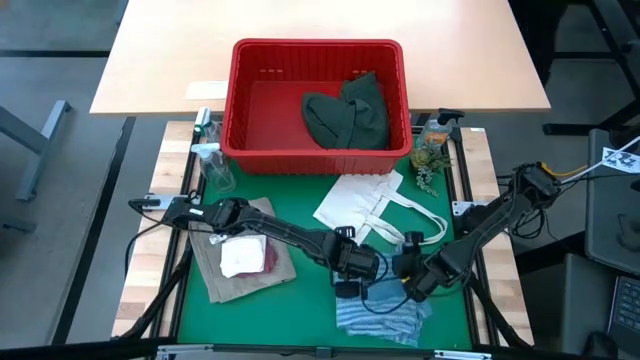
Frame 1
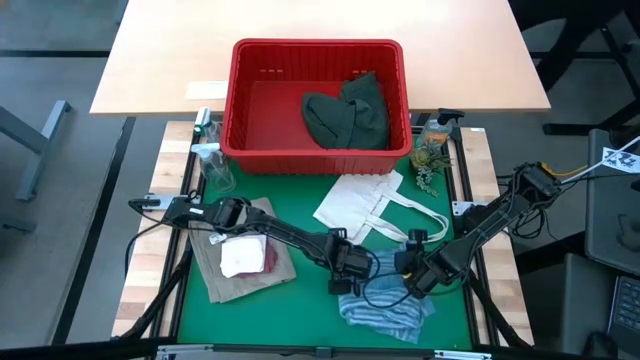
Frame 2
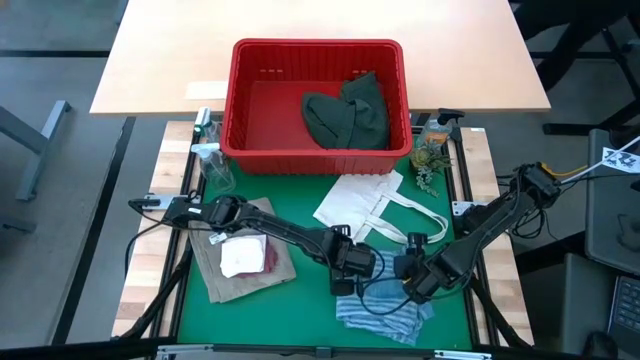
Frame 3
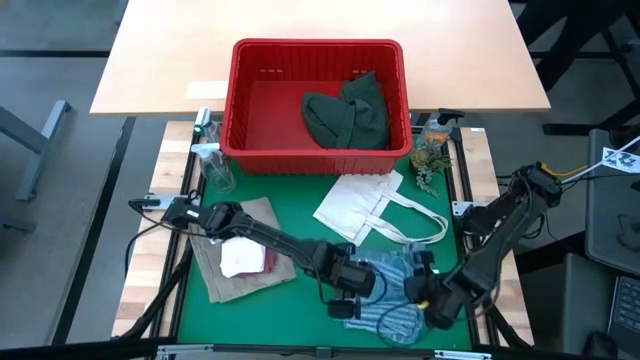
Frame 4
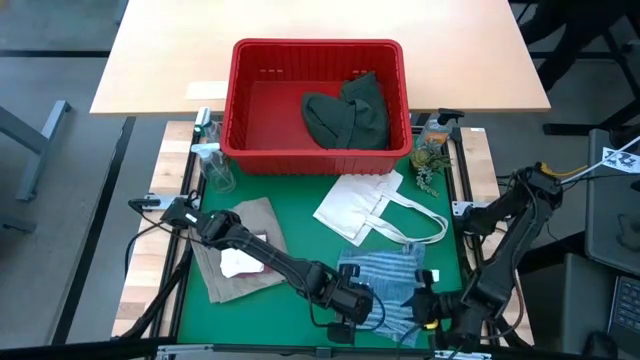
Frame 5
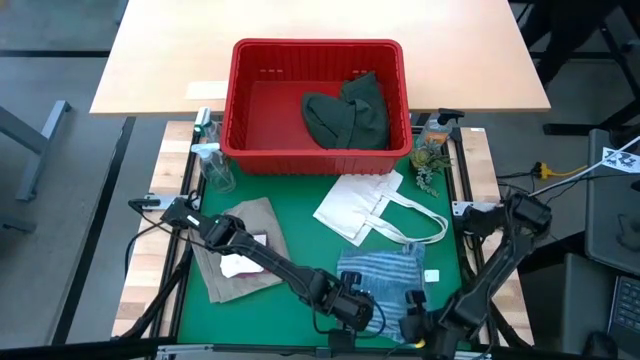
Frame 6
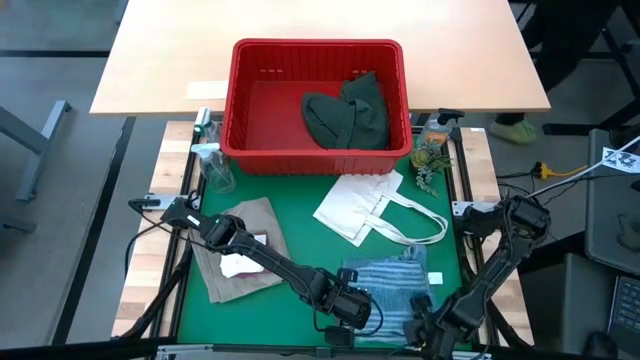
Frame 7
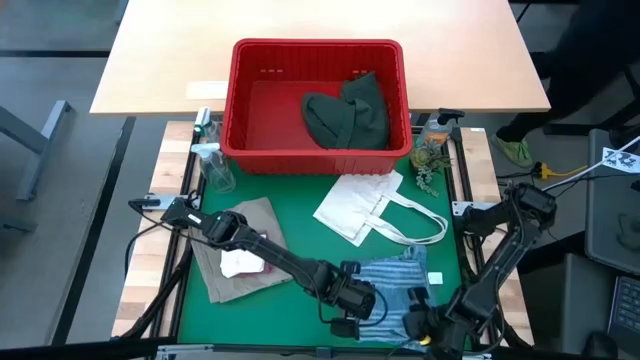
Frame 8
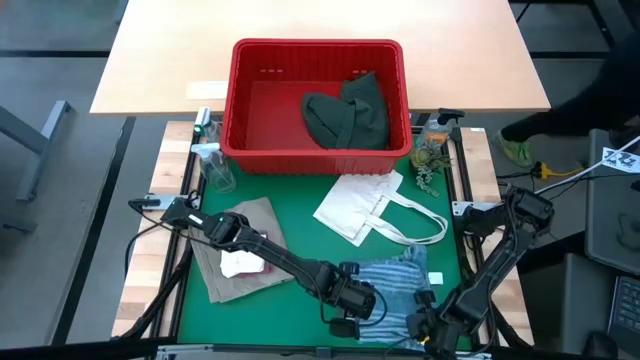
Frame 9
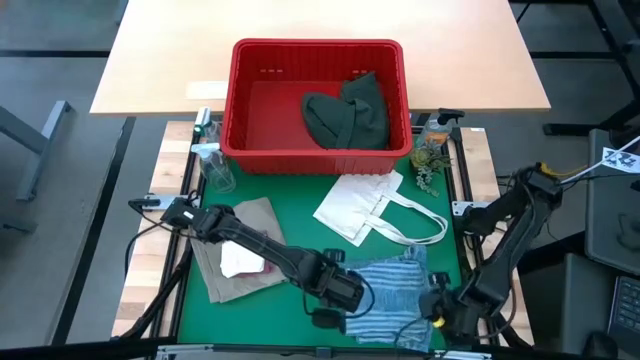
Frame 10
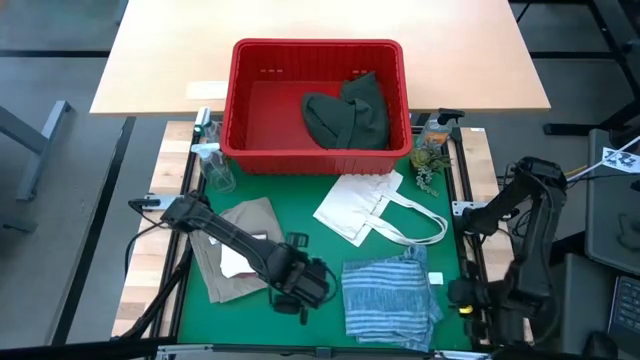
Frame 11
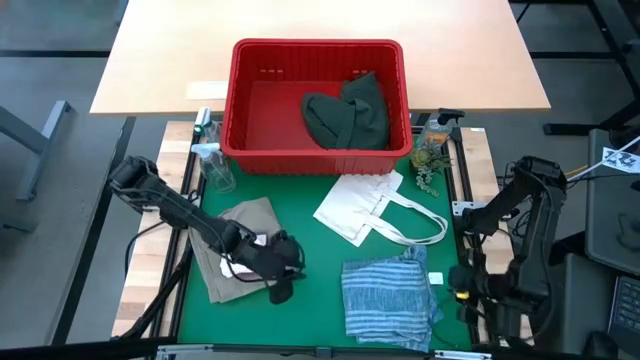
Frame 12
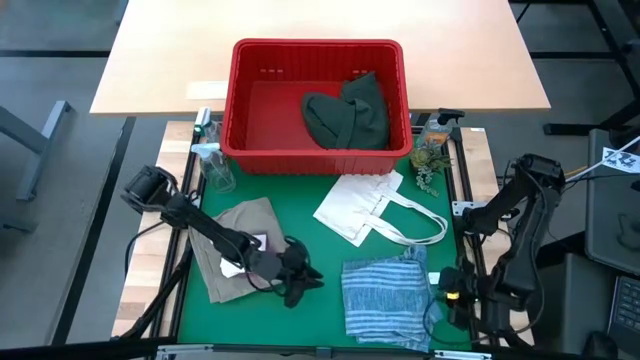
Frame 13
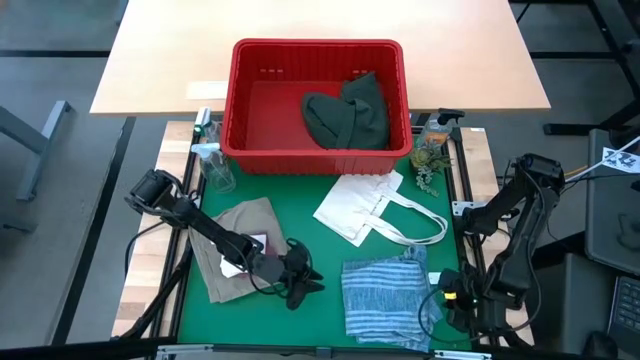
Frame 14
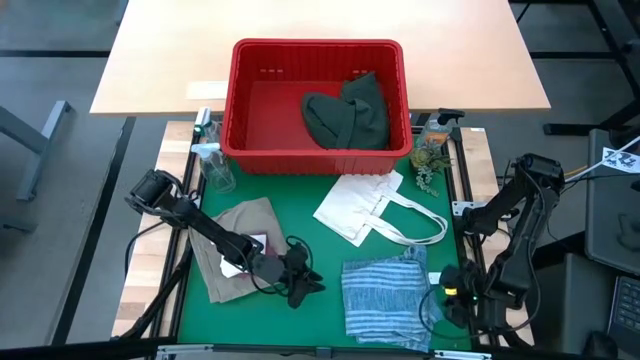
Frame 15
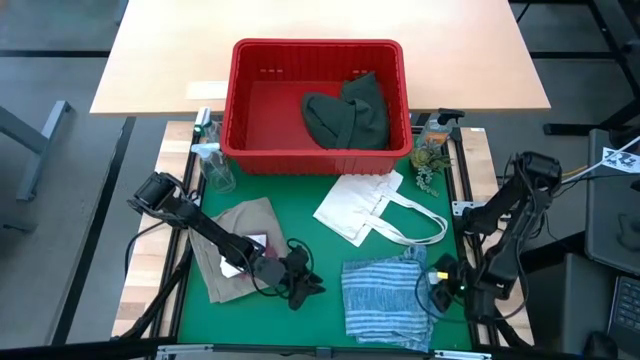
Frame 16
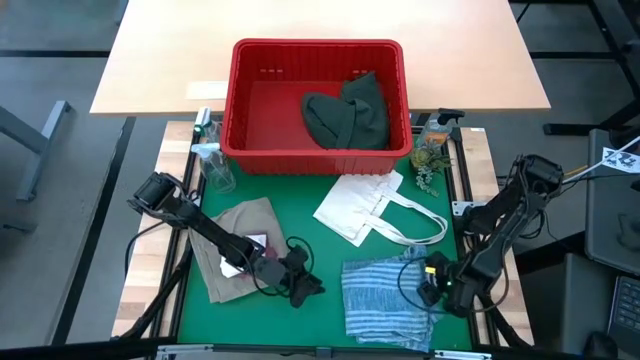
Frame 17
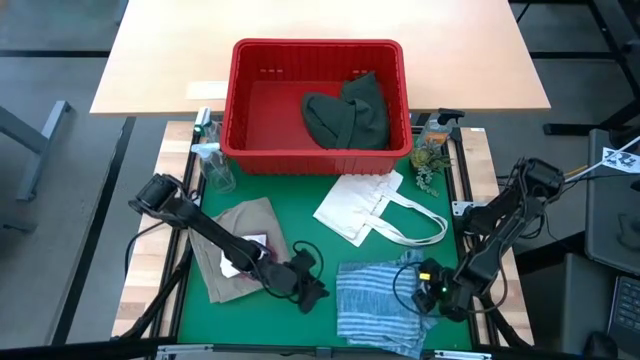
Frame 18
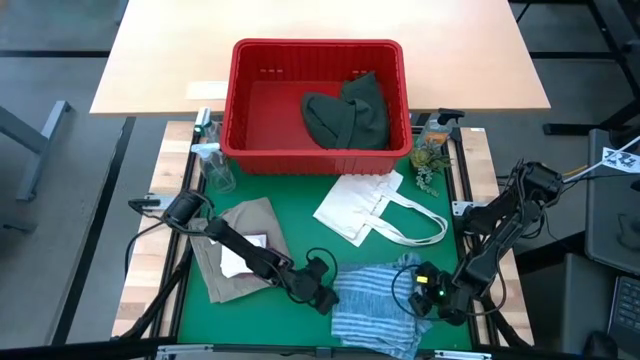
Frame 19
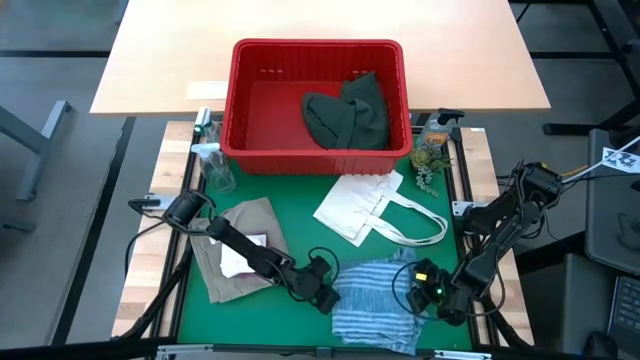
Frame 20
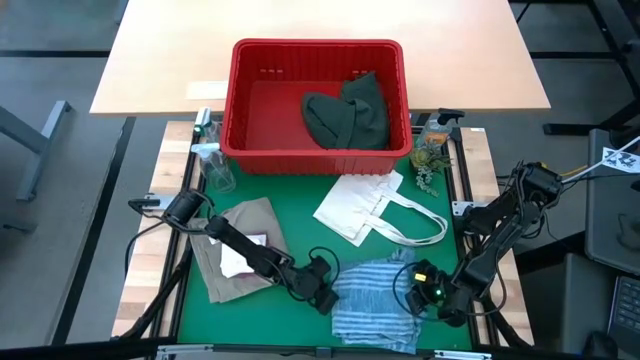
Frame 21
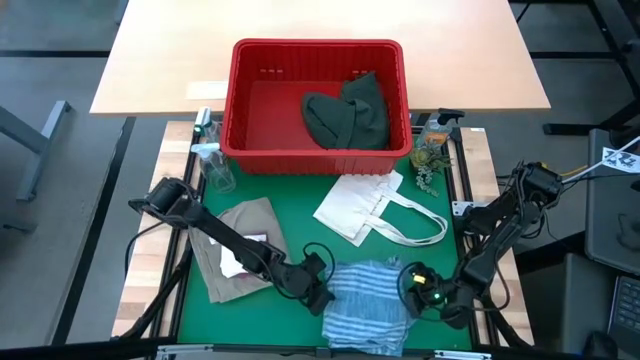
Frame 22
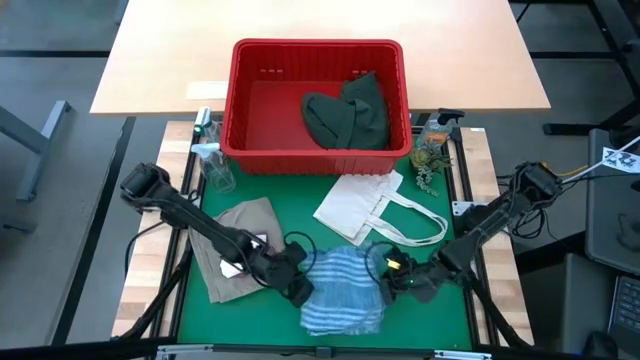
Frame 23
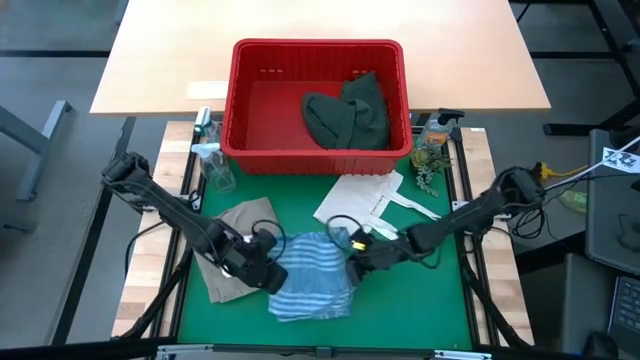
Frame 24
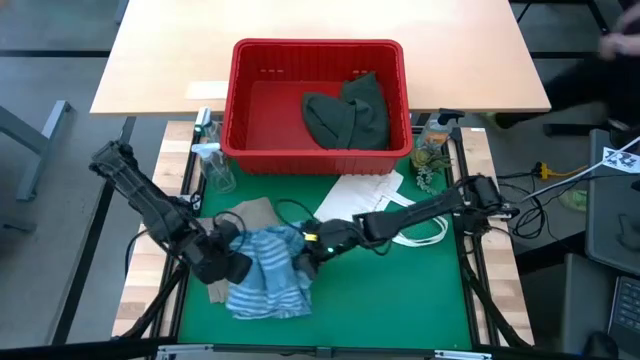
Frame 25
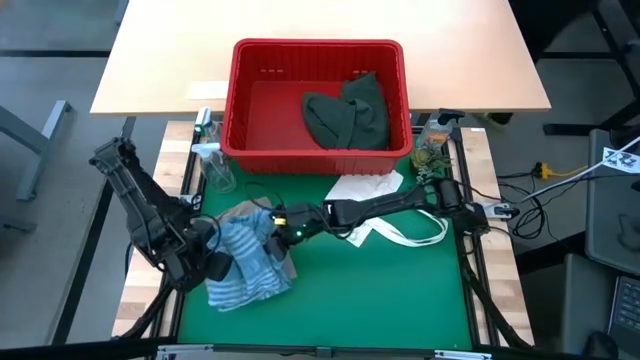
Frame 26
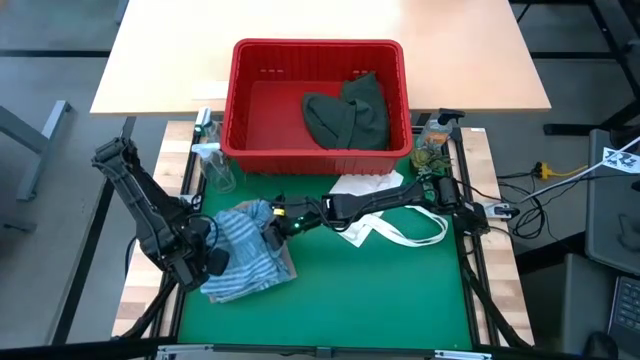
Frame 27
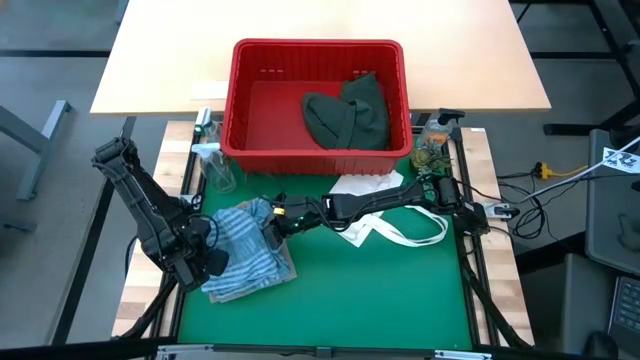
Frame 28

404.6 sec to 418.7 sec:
Task: Fold Laundry from Bin
Stack the folded blue polo shirt on top of the gray shorts

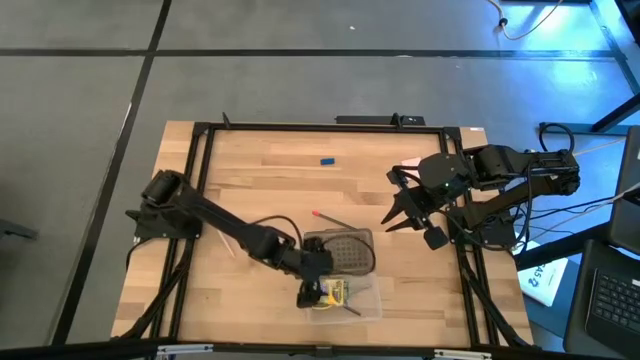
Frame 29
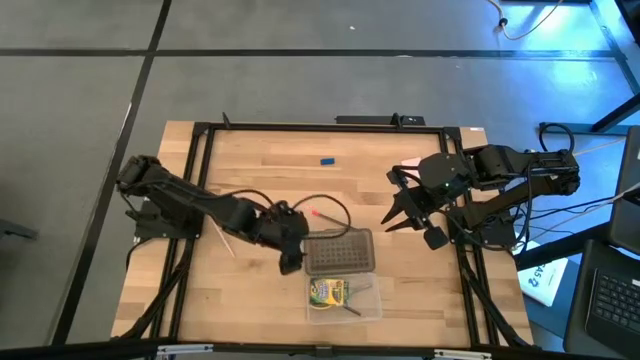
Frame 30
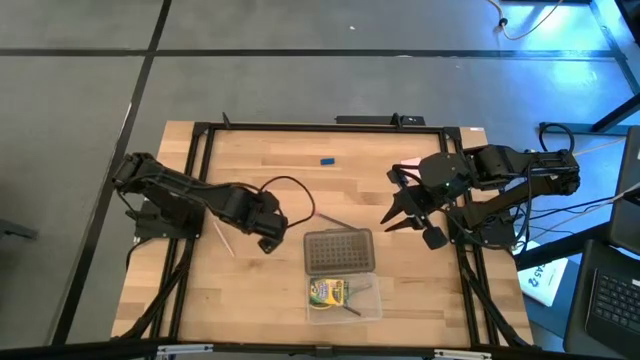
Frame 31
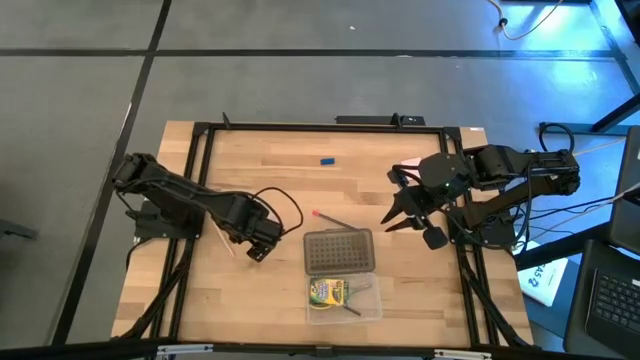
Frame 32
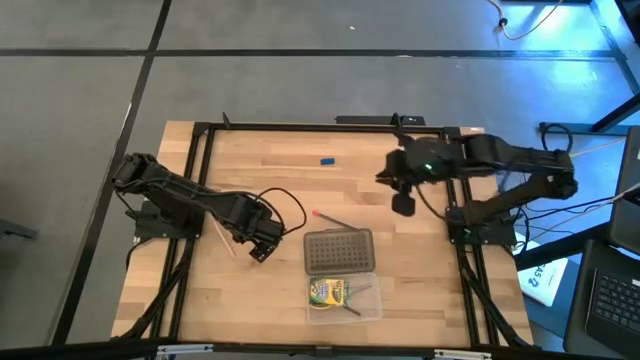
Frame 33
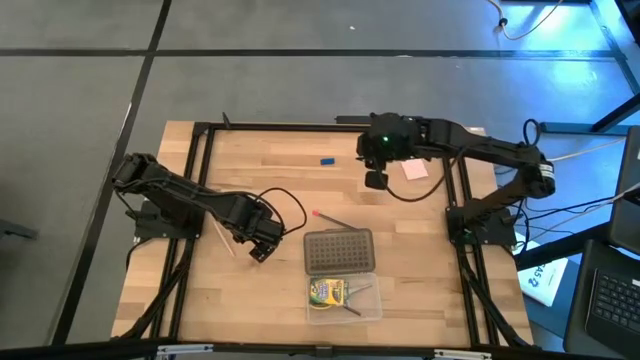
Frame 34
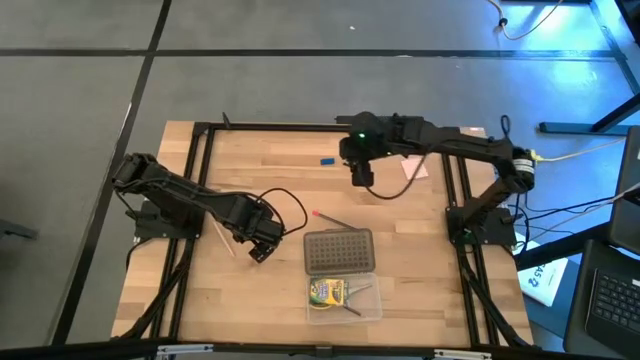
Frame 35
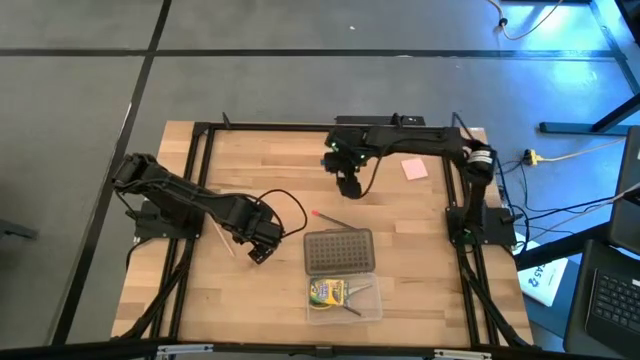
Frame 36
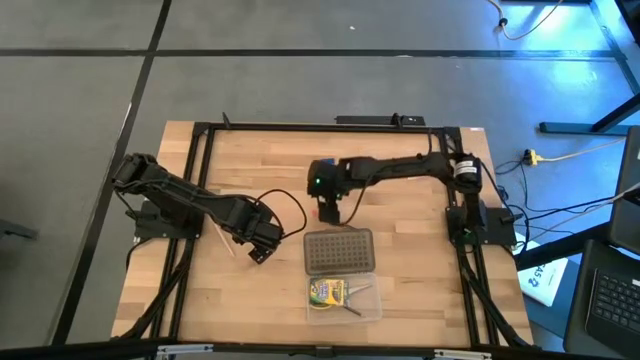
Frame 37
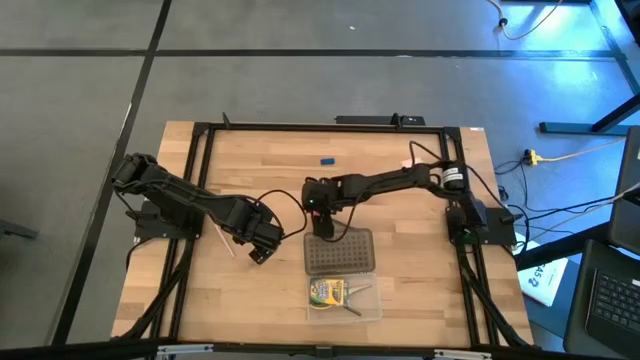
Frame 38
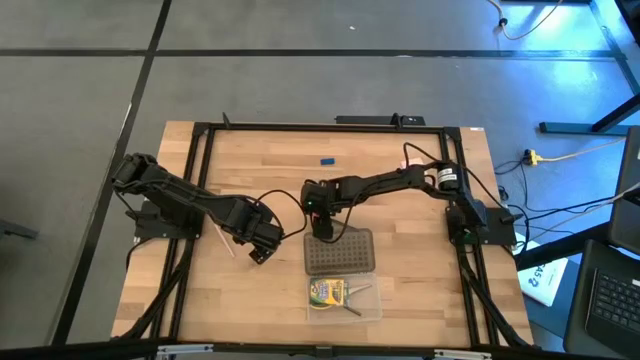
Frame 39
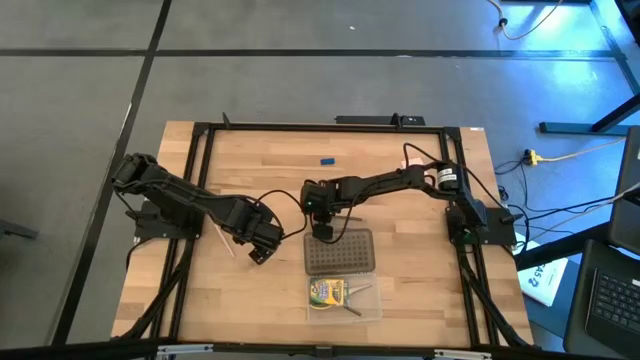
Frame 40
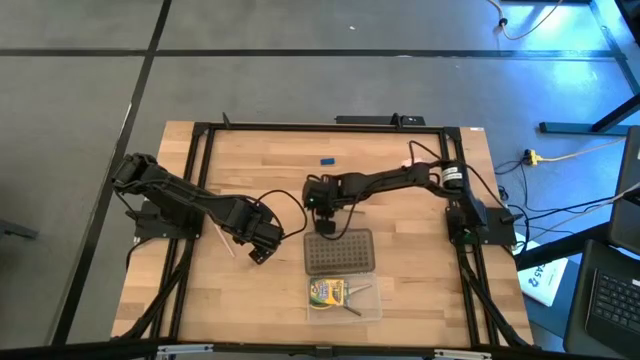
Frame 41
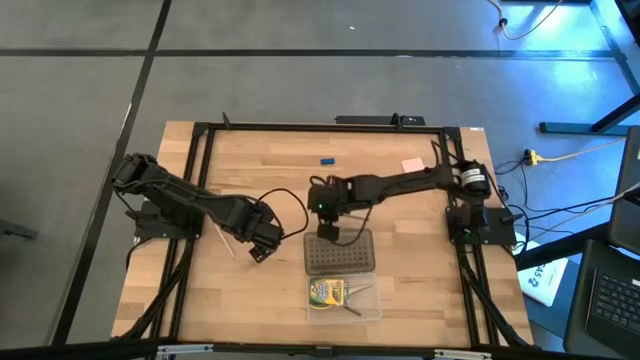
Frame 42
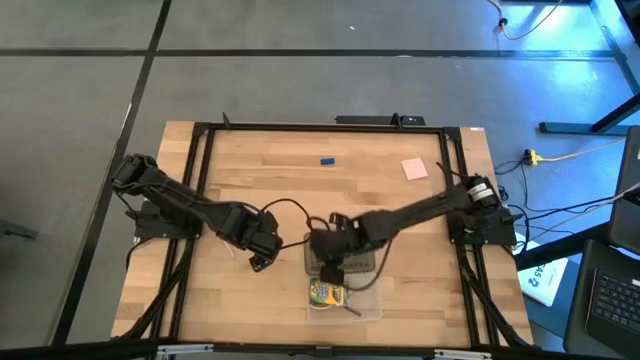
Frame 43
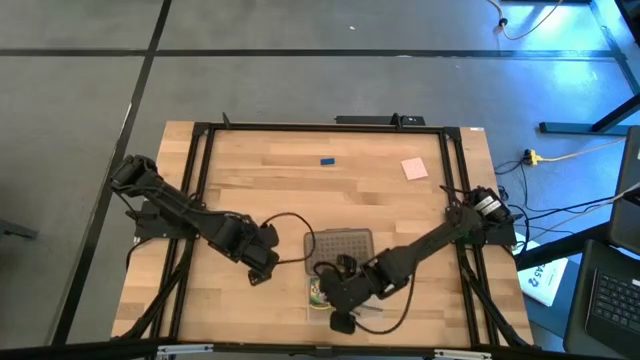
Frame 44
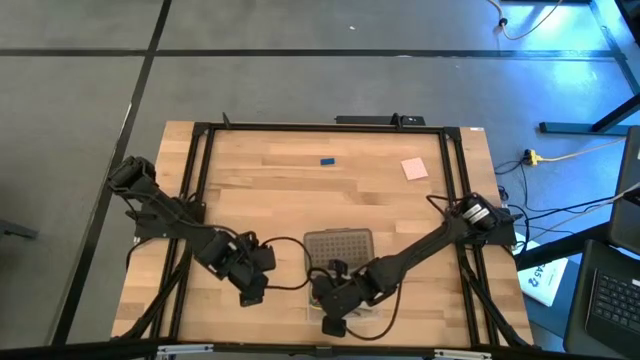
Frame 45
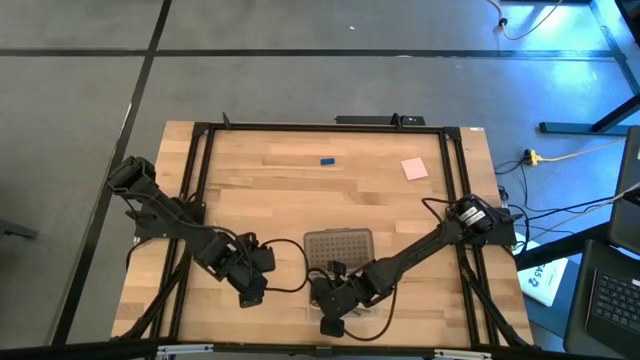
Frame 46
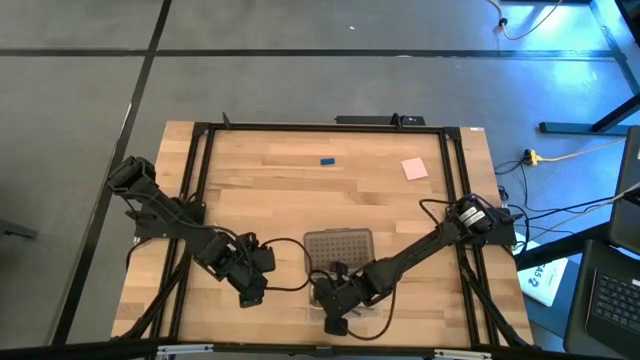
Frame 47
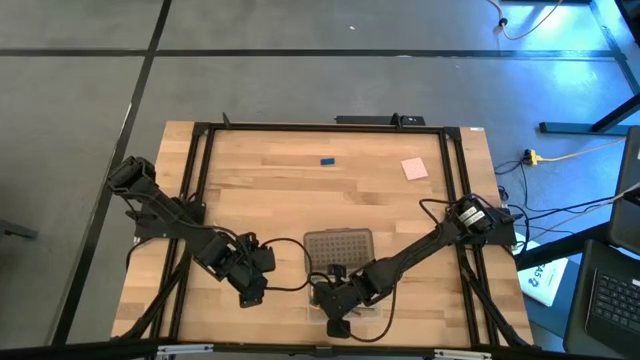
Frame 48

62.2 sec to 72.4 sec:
Task: Pack school essentials
Put the pink and black pencil into the supply box
